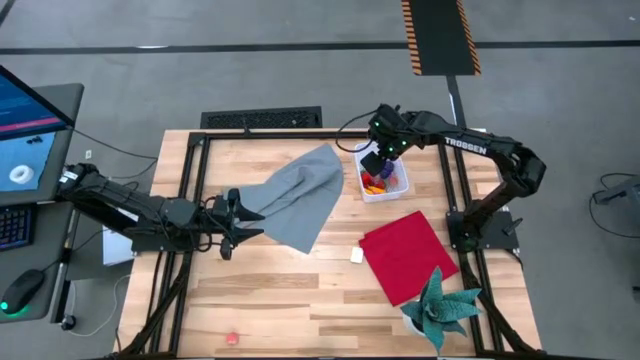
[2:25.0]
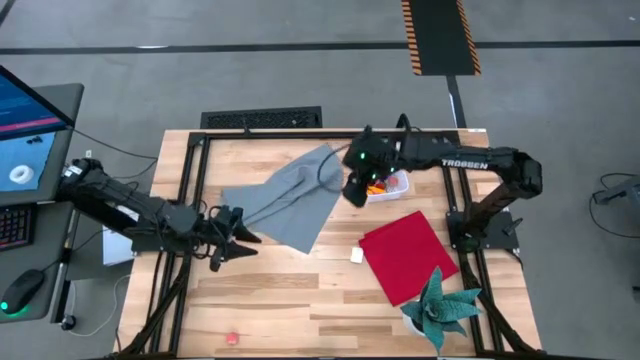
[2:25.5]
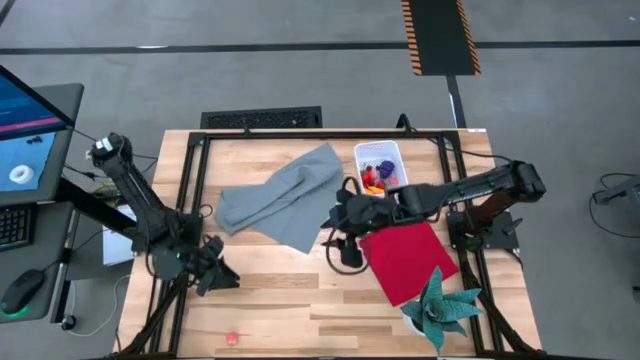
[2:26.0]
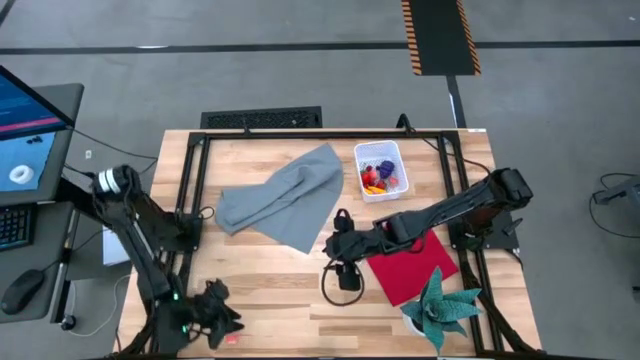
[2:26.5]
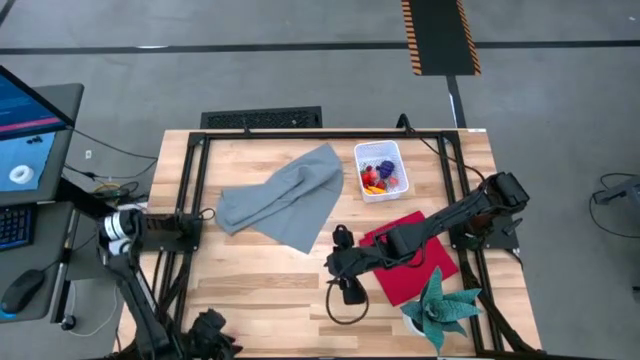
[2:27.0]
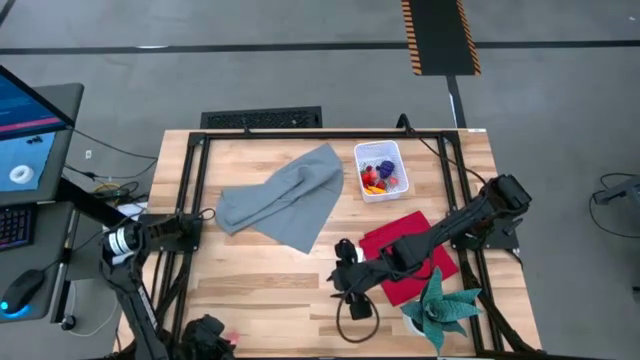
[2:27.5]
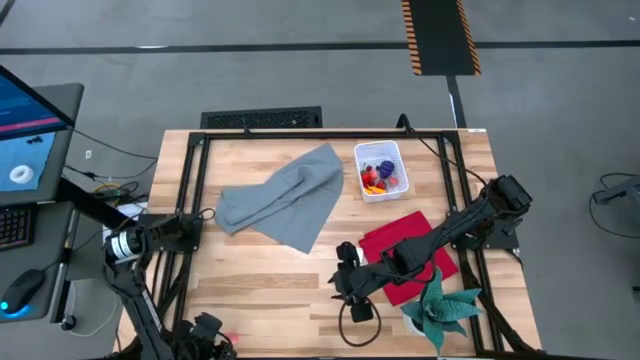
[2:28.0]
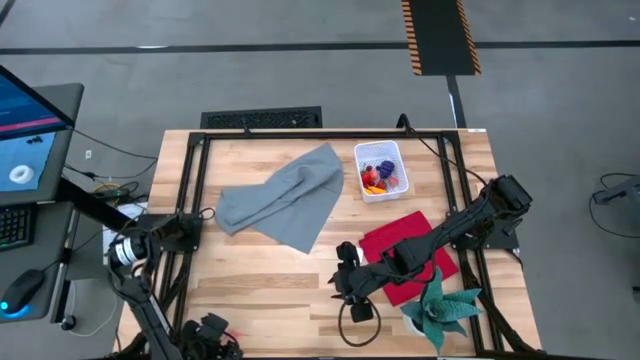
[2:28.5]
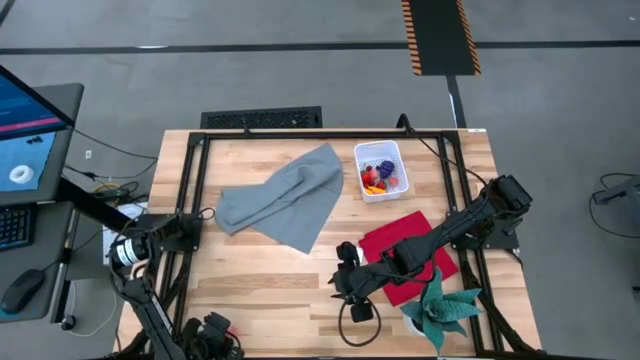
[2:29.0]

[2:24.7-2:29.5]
Task: Pick and placing Produce into tupperware
Put the pink peach into the white bin

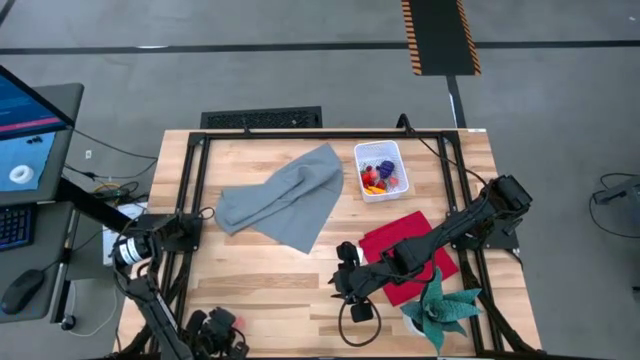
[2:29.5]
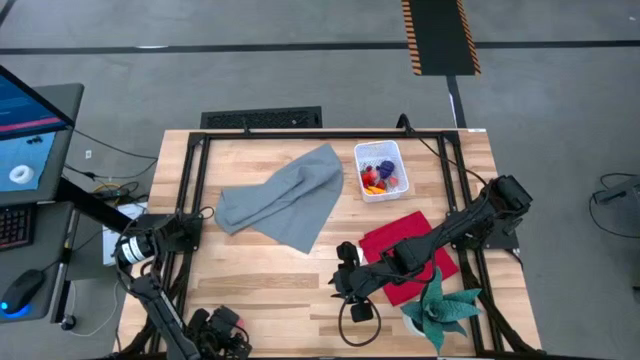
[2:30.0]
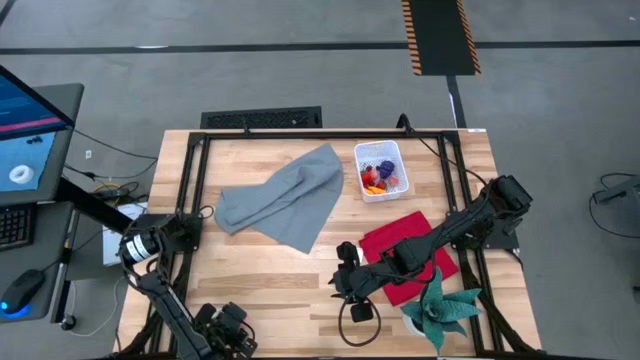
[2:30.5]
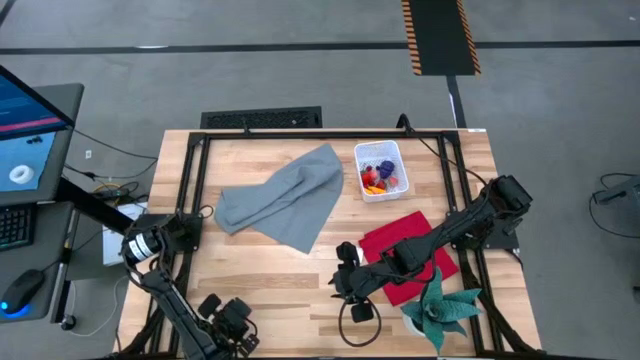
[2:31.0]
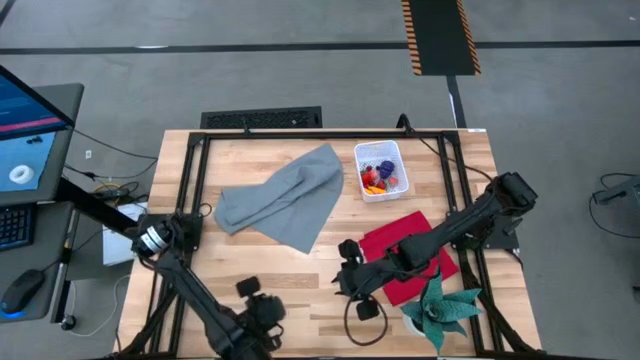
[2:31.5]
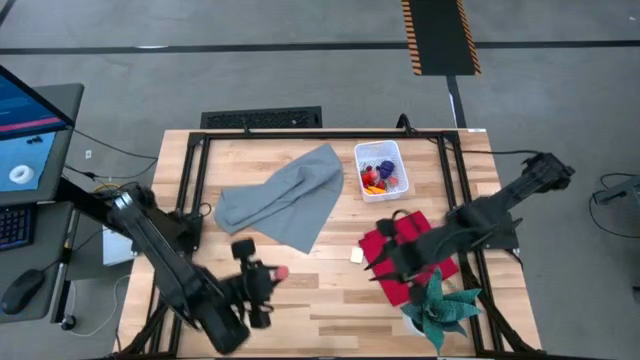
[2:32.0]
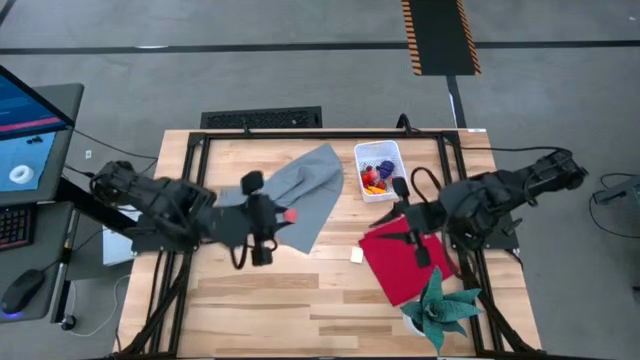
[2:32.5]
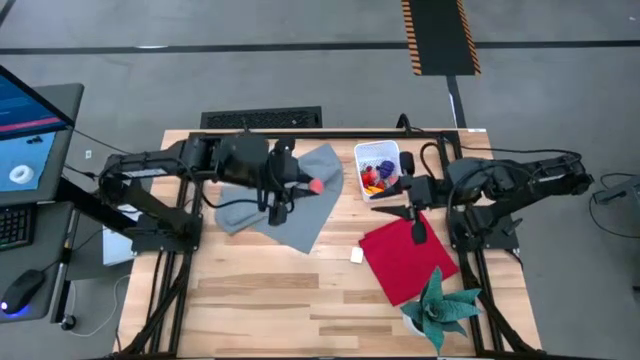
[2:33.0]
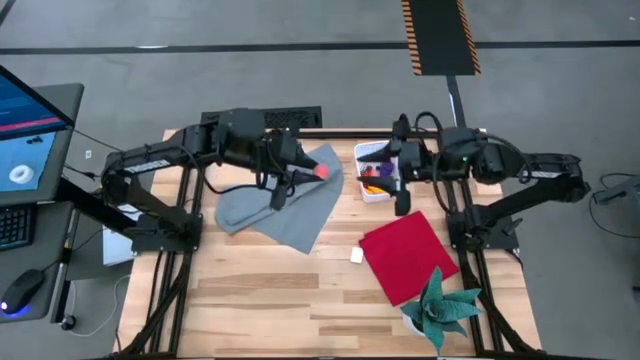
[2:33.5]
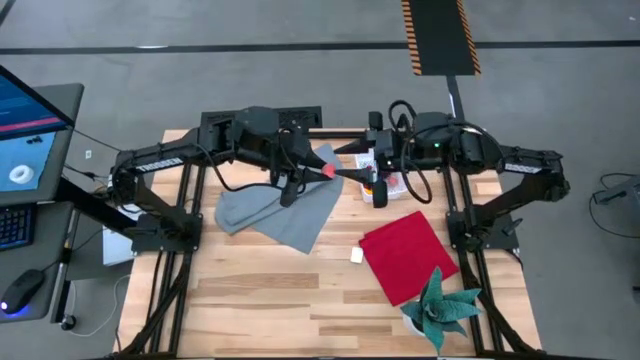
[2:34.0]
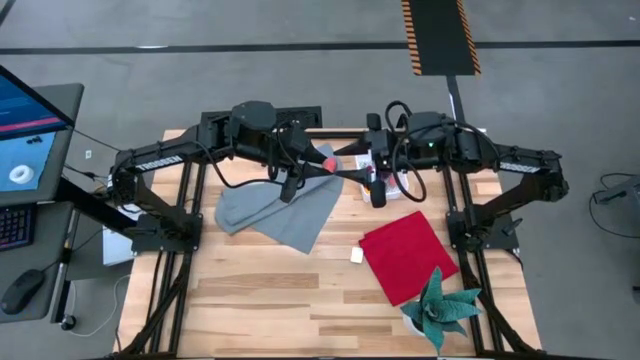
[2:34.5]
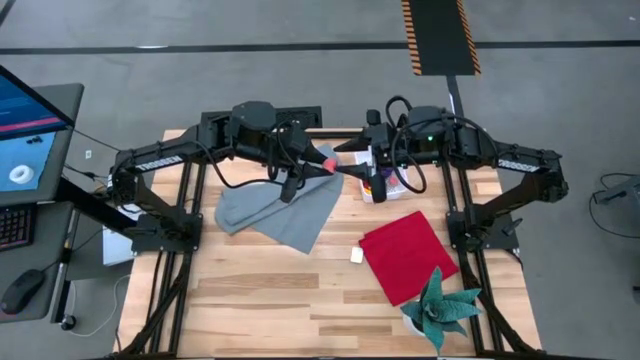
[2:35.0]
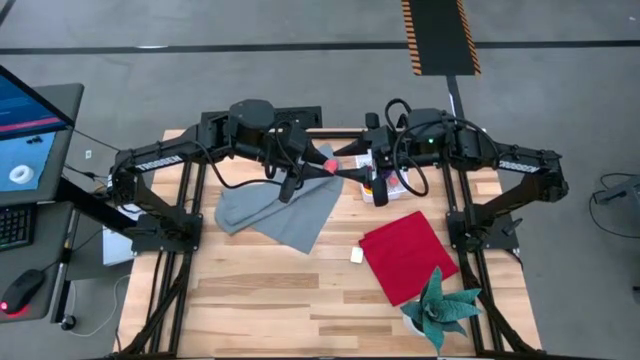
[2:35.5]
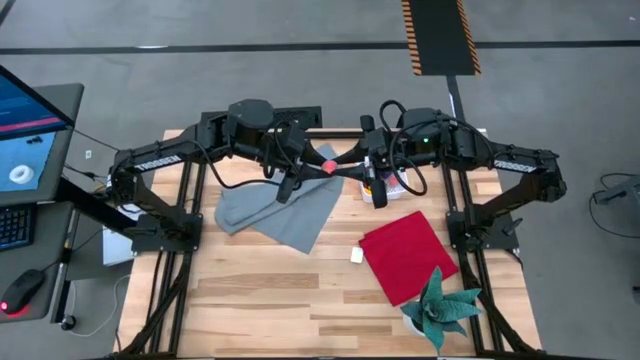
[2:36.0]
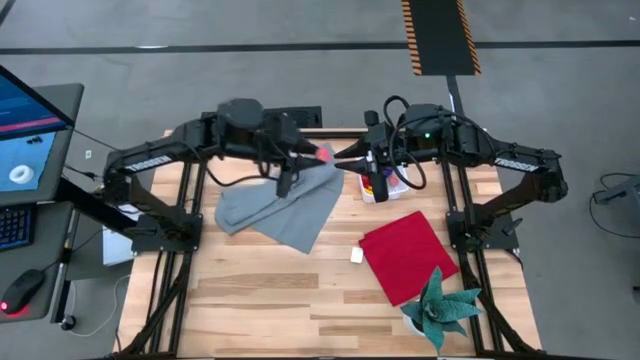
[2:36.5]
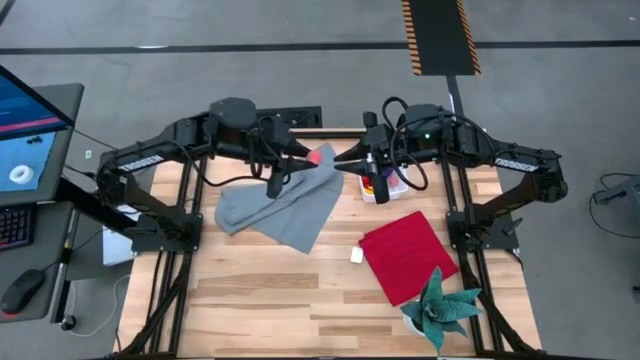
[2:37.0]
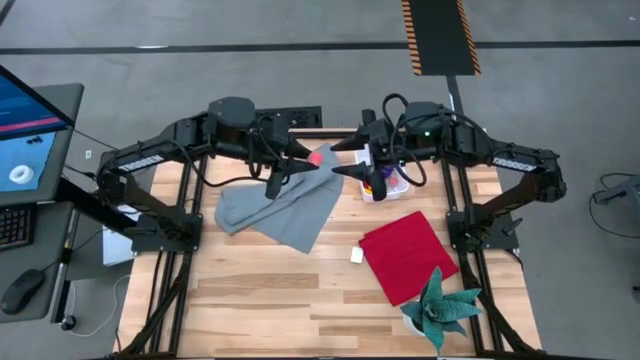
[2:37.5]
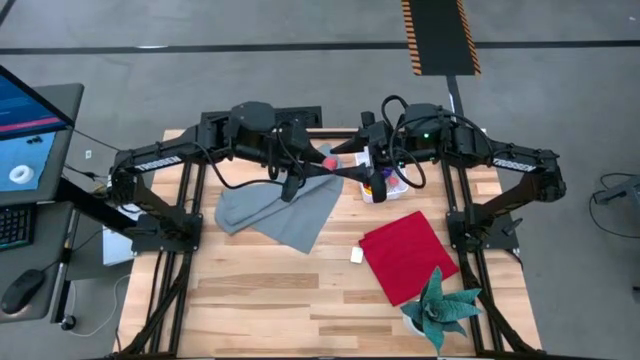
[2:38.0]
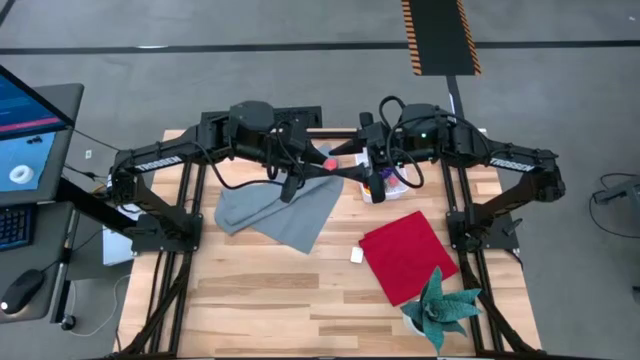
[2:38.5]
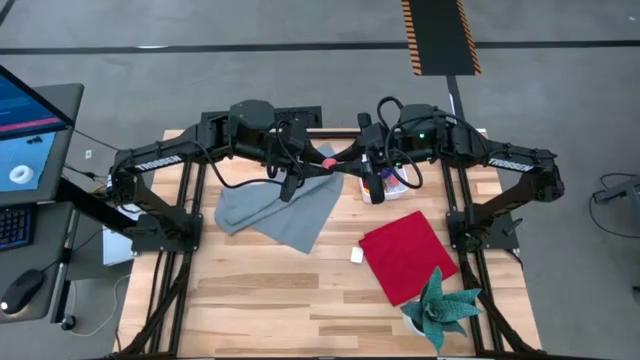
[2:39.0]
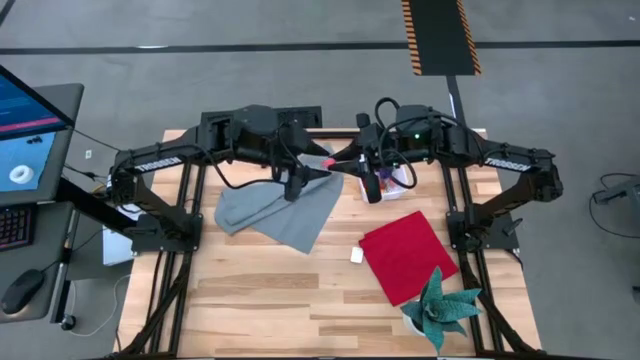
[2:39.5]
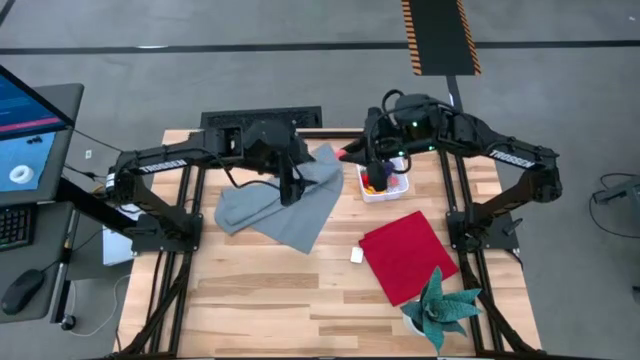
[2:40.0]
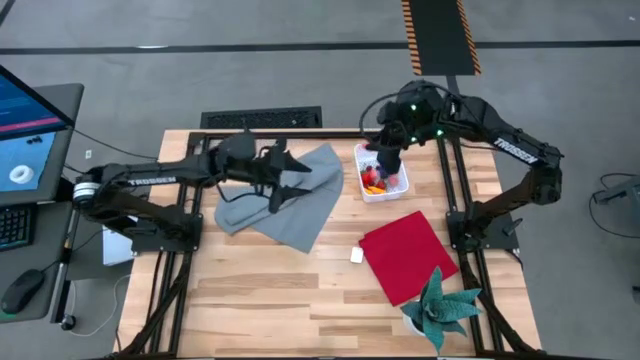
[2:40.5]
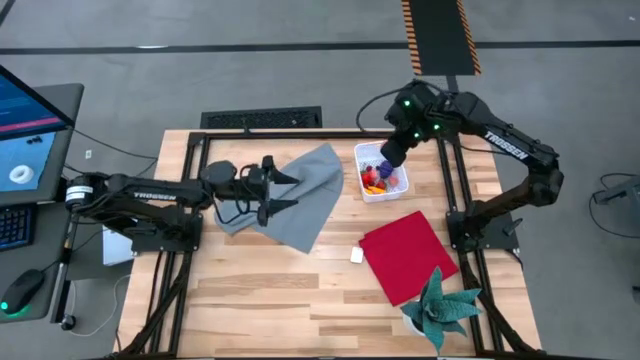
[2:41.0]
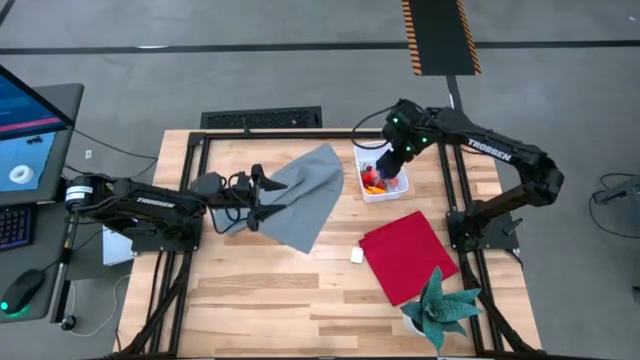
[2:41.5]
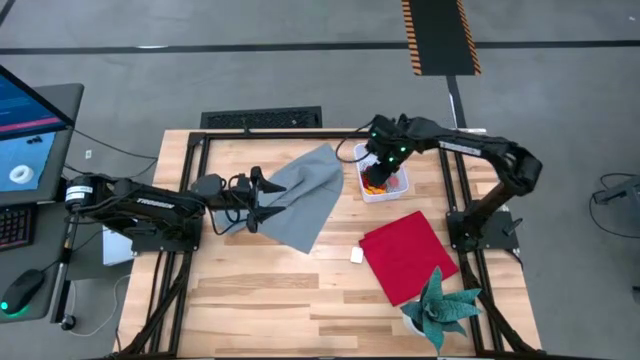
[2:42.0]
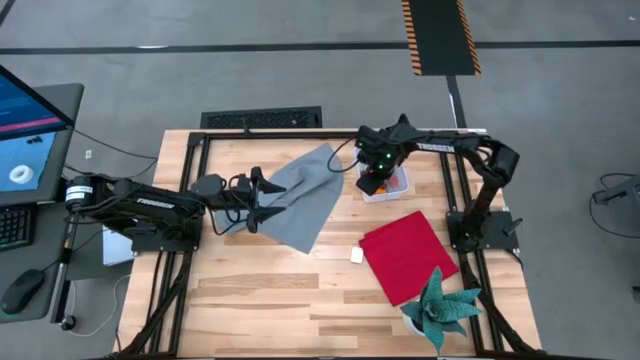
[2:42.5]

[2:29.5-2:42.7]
Put the pink peach into the white bin

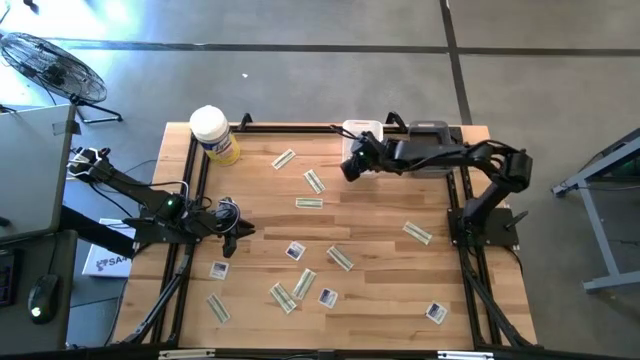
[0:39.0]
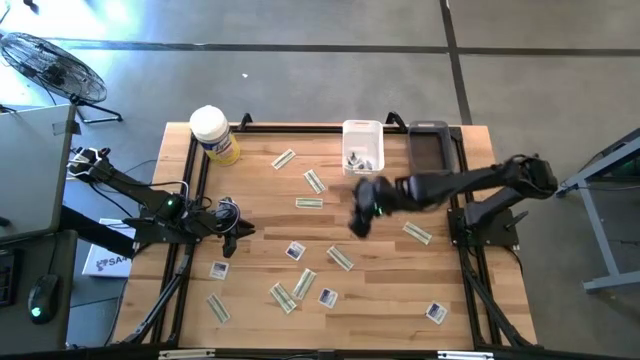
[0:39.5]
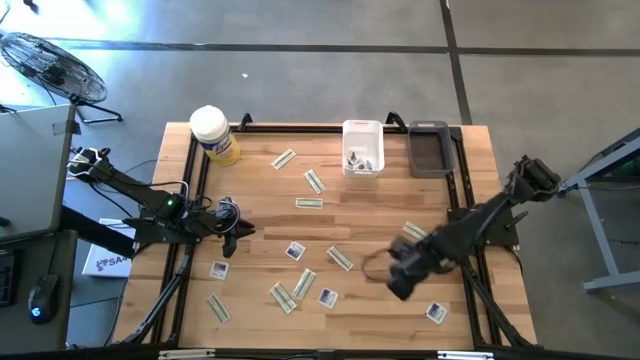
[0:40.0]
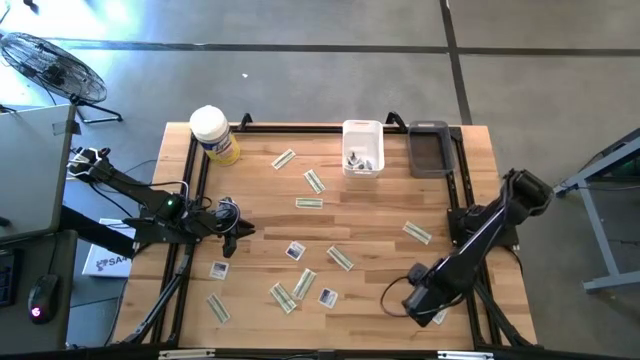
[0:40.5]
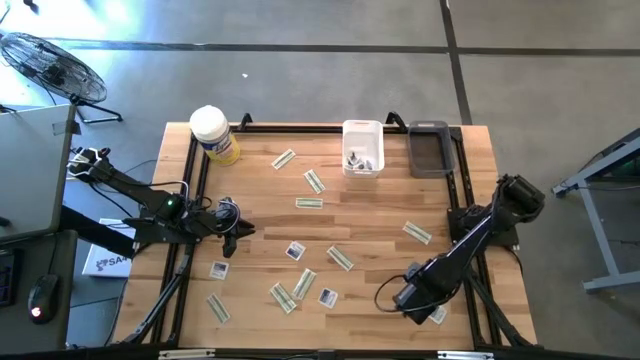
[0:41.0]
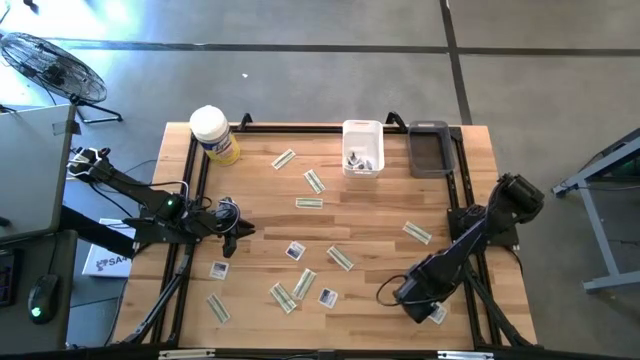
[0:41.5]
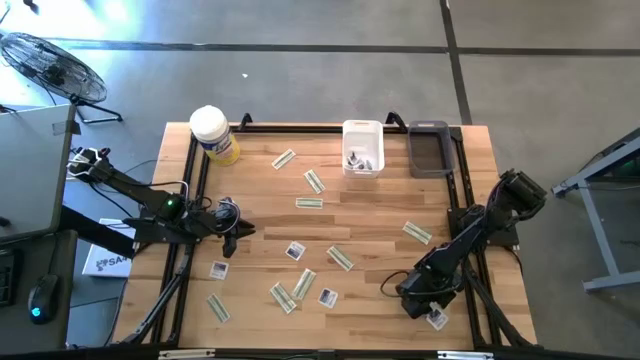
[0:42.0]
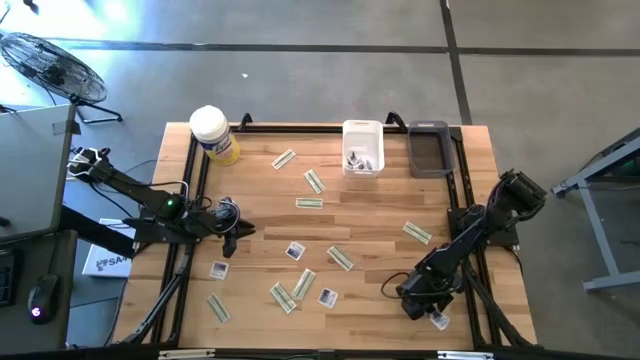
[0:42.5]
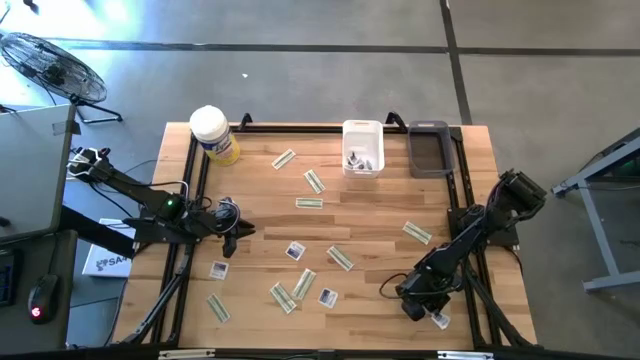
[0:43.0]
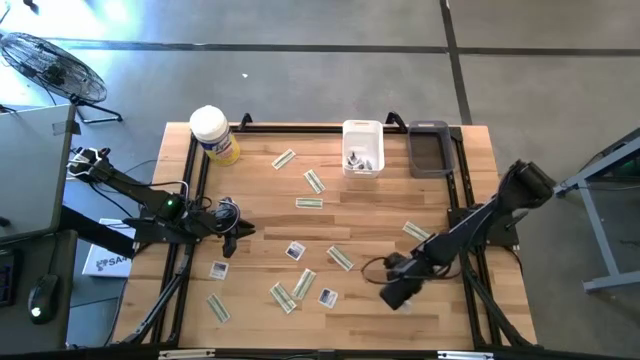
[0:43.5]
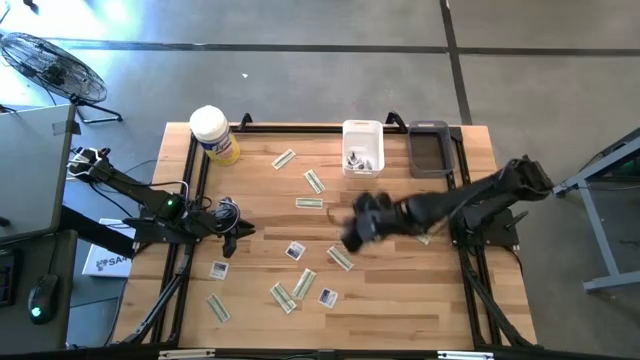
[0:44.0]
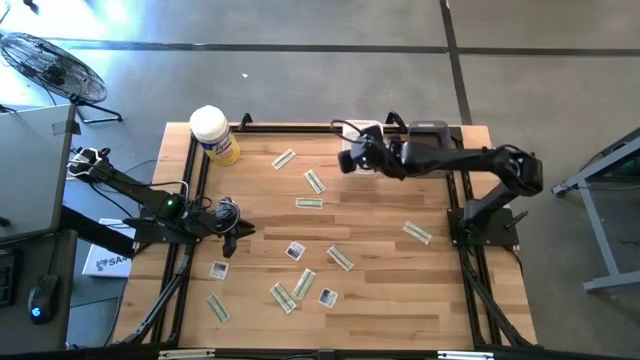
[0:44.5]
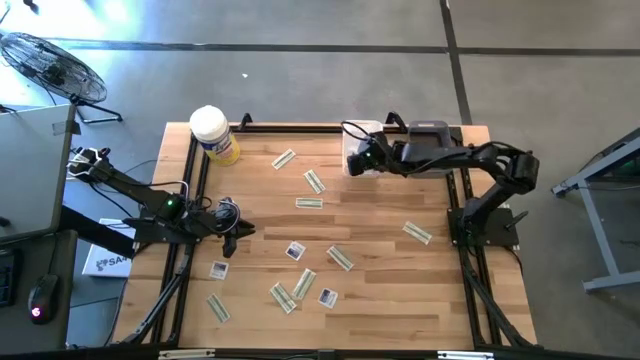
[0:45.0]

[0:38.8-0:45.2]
Task: Pick & Place First Aid Supplies
Put the blue alcohol pad into the white bin
